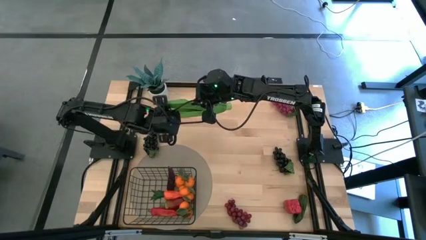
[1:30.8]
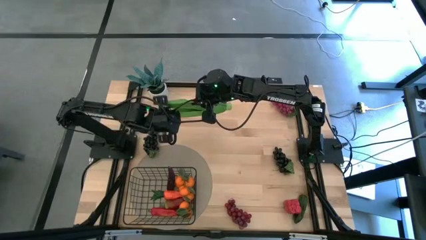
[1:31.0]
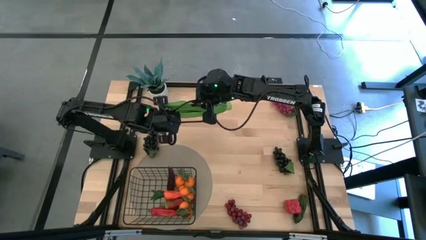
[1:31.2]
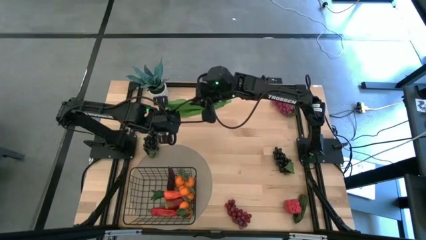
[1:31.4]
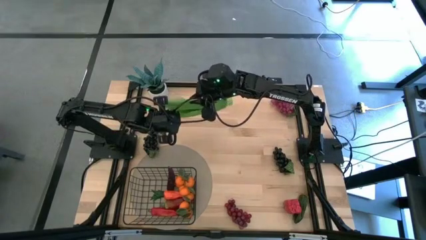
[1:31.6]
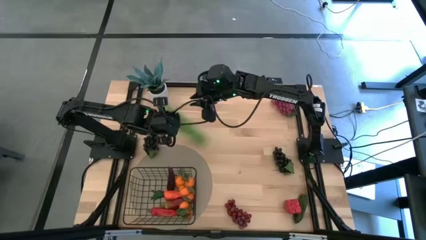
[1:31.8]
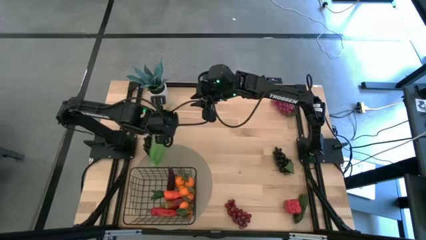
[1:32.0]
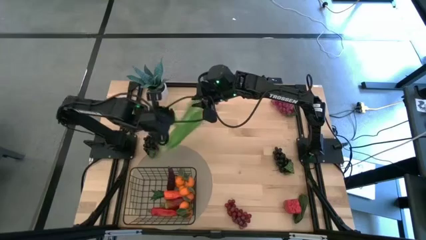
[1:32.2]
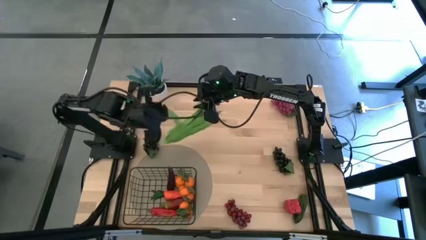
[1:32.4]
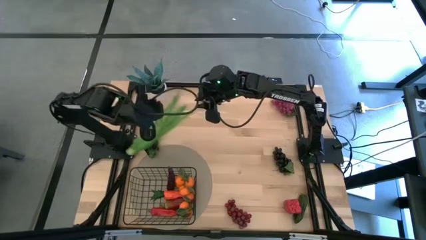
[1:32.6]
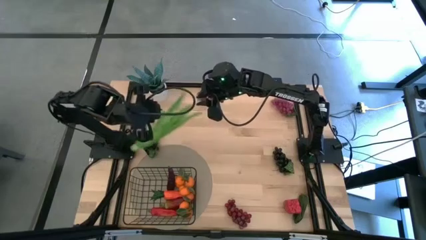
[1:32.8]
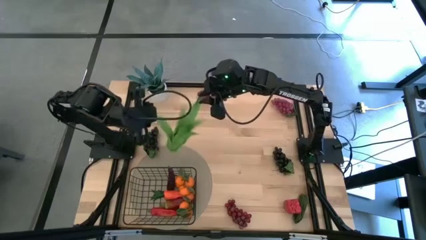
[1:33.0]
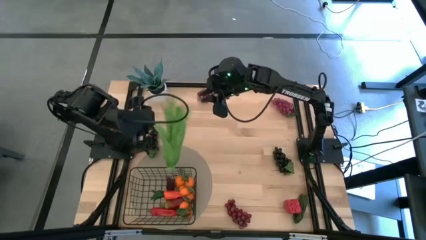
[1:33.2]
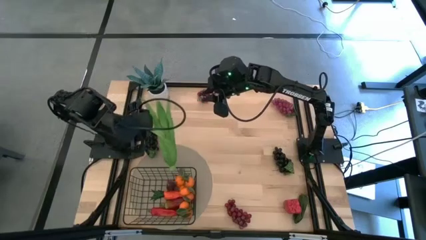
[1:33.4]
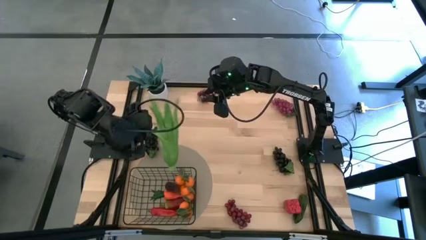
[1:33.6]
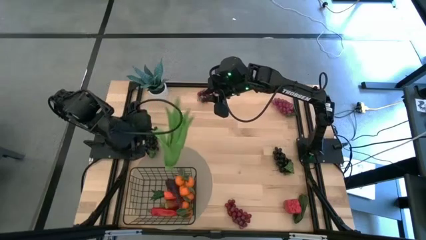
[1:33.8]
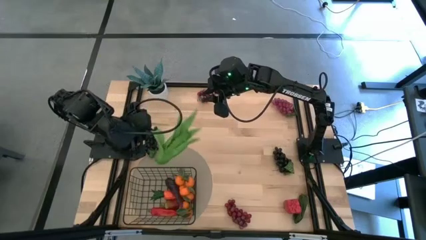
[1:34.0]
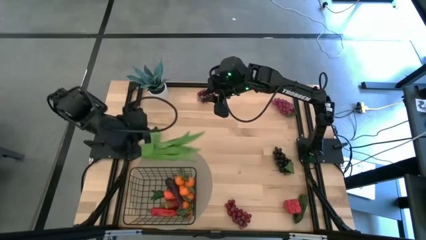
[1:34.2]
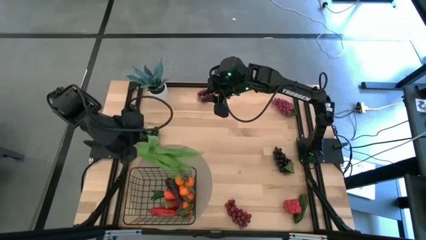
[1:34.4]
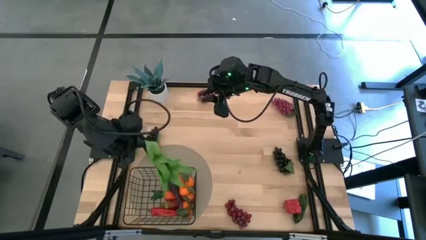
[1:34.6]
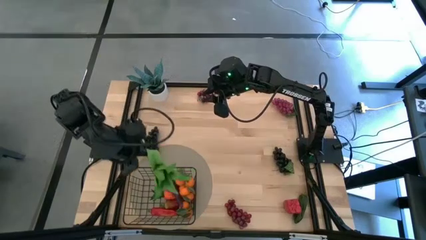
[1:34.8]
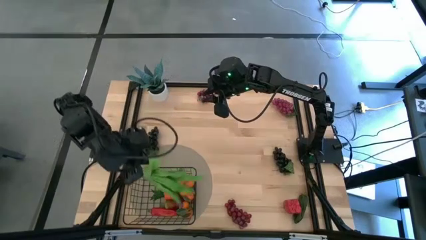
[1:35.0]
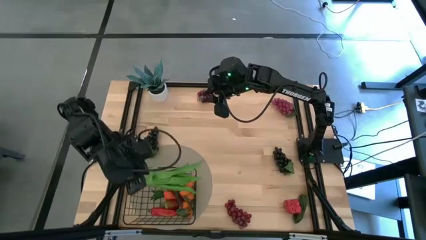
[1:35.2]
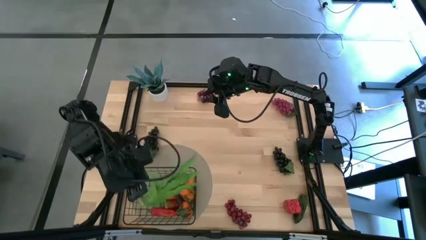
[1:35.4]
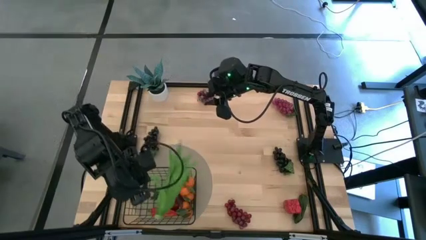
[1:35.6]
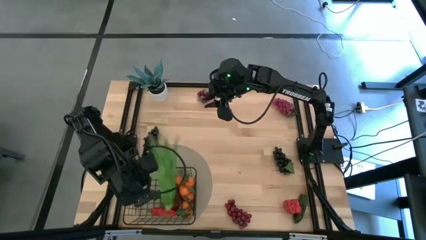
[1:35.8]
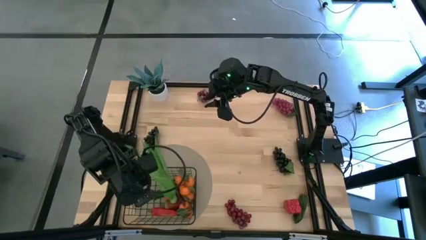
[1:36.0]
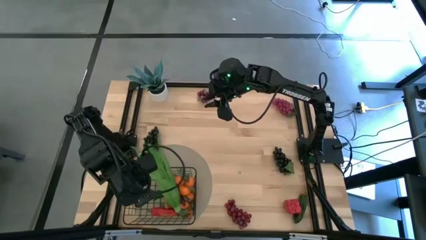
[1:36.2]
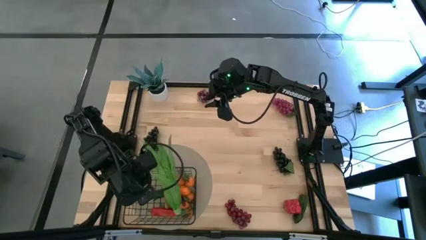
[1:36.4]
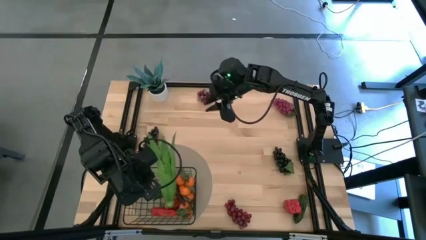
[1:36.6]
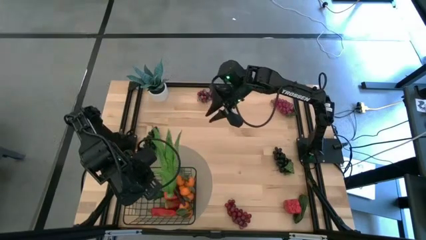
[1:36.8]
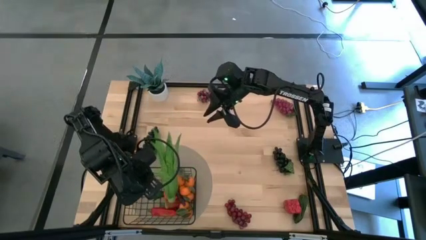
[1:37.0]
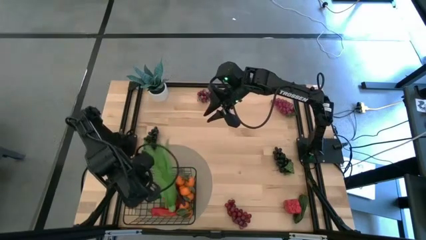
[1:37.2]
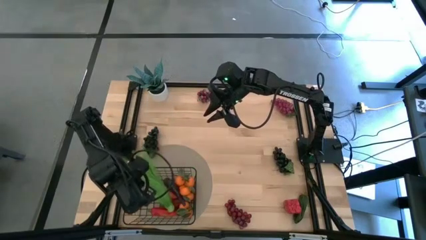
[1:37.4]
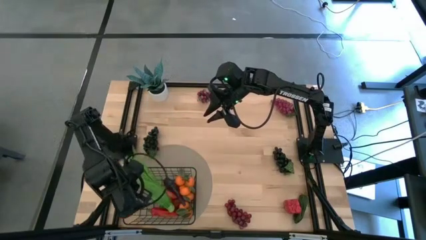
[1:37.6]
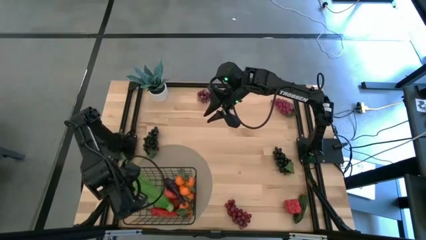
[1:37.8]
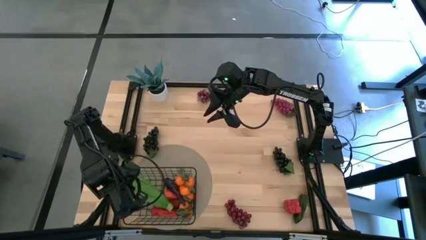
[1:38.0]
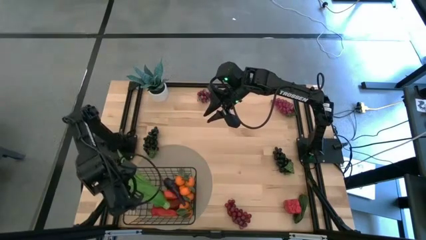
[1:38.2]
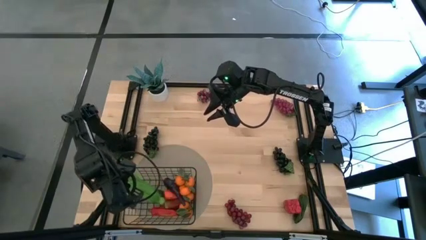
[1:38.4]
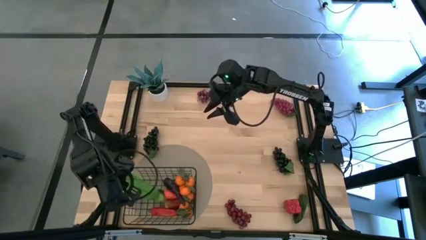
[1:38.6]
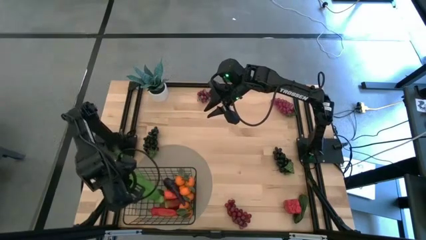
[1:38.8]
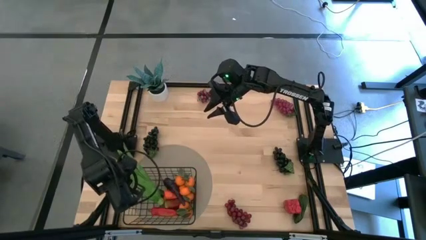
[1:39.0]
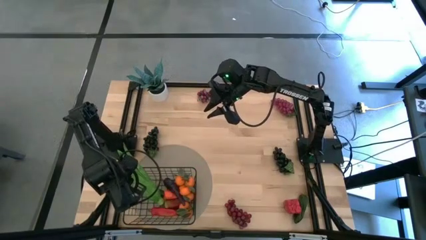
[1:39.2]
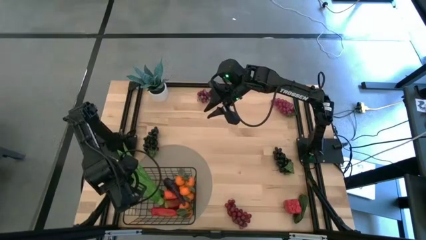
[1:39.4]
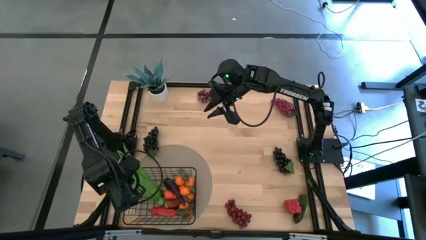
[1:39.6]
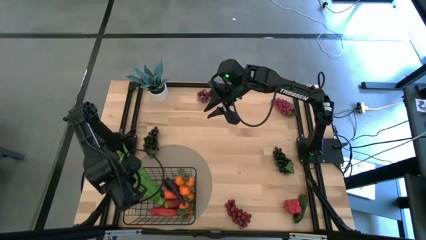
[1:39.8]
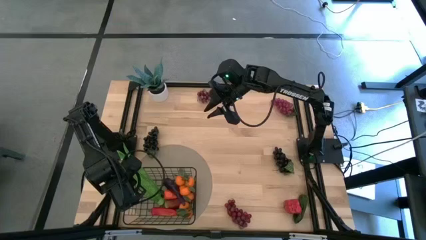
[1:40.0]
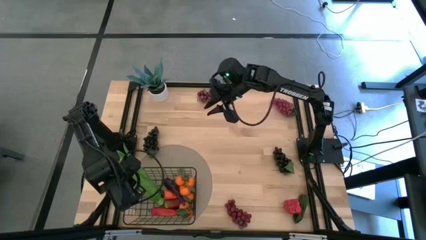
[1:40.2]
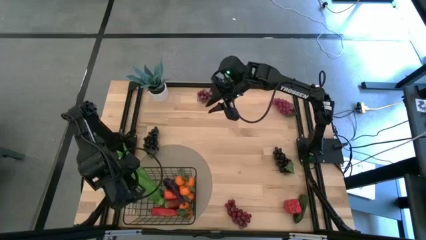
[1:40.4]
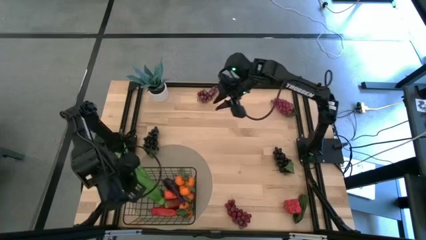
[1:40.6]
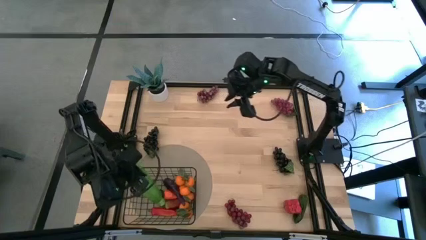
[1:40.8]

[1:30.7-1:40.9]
Task: Build produce basket
Put the lettuce into the wire basket

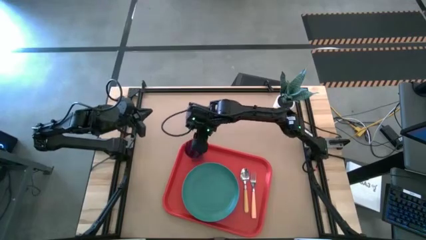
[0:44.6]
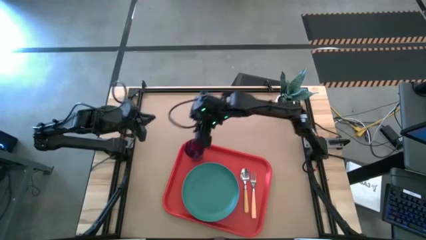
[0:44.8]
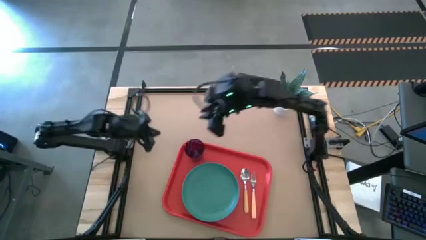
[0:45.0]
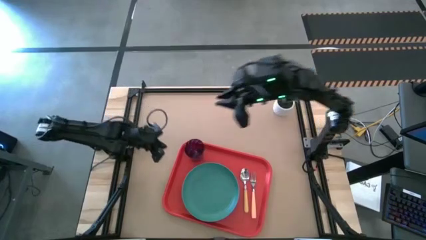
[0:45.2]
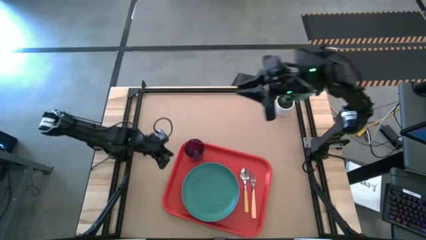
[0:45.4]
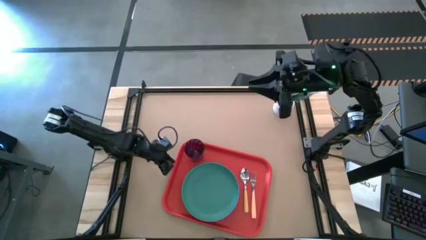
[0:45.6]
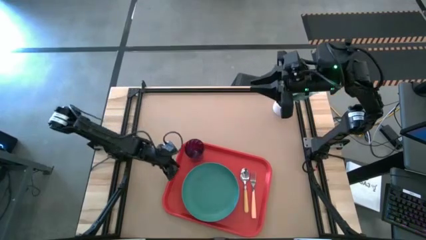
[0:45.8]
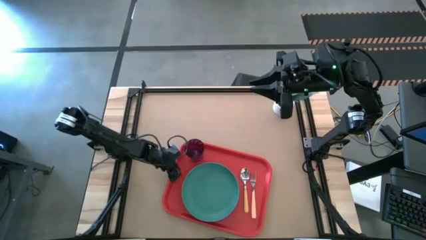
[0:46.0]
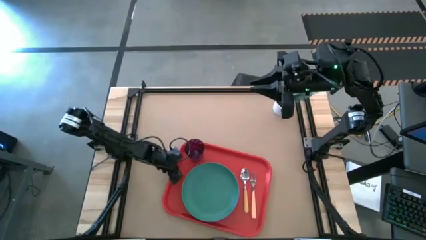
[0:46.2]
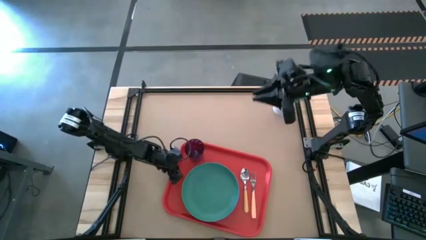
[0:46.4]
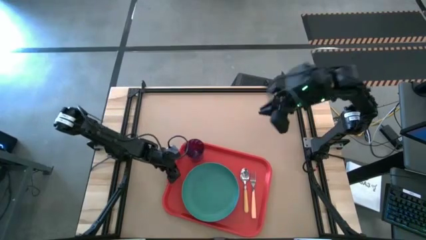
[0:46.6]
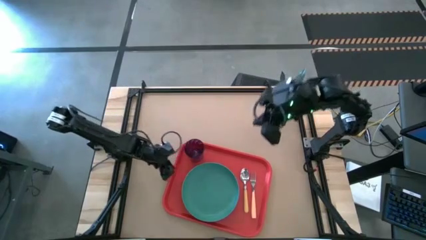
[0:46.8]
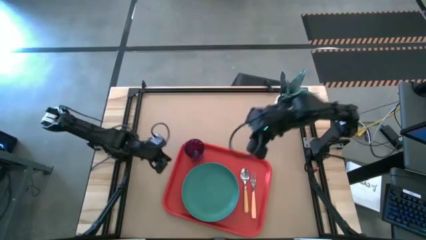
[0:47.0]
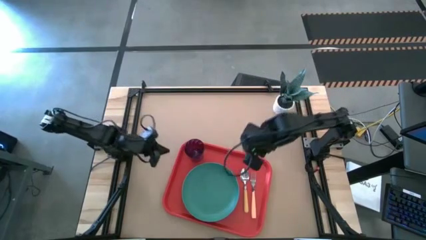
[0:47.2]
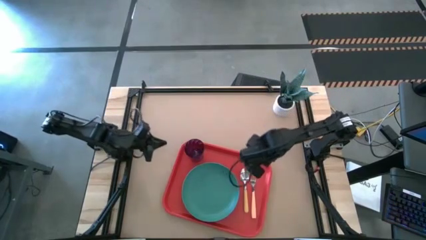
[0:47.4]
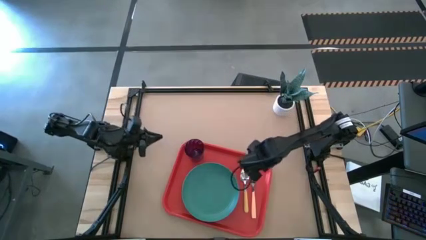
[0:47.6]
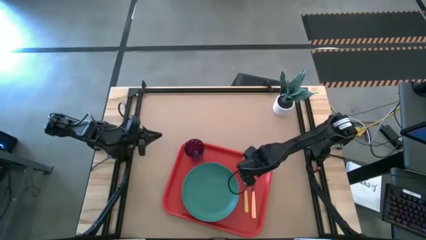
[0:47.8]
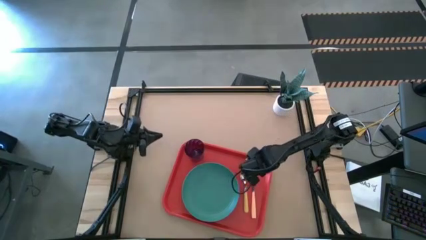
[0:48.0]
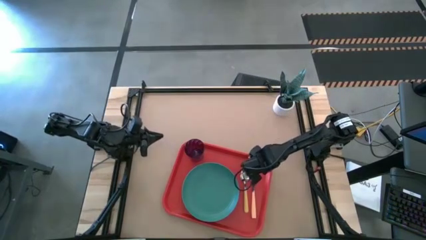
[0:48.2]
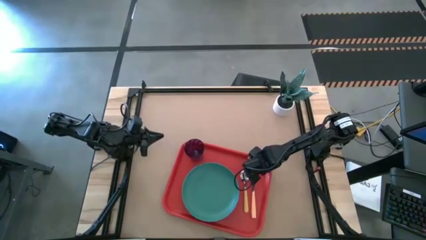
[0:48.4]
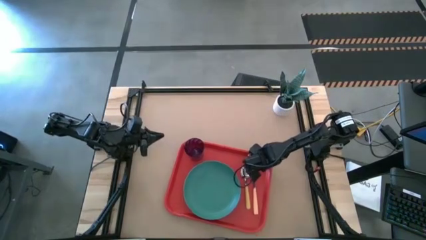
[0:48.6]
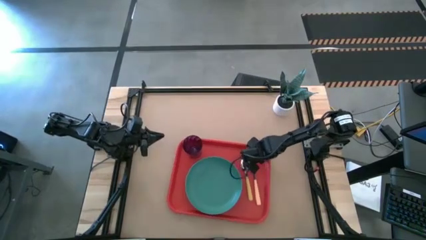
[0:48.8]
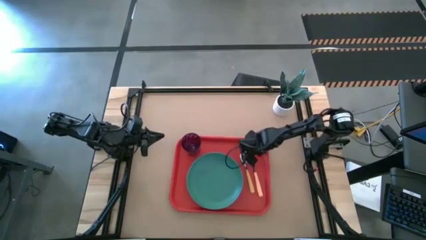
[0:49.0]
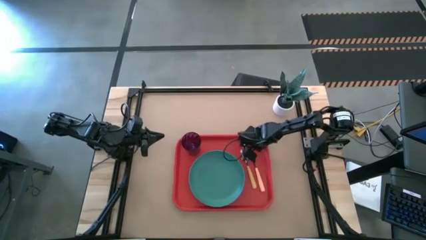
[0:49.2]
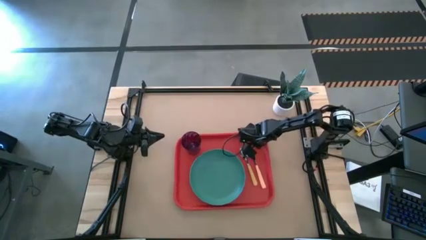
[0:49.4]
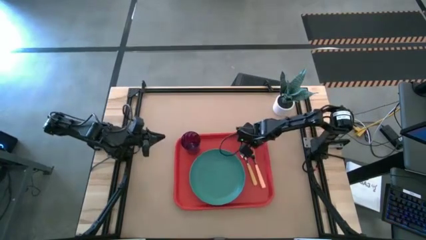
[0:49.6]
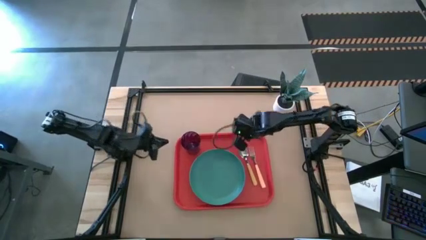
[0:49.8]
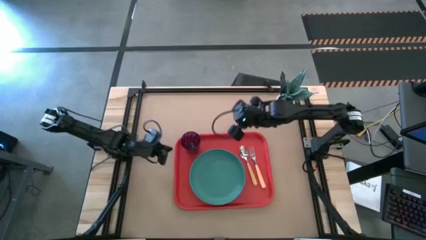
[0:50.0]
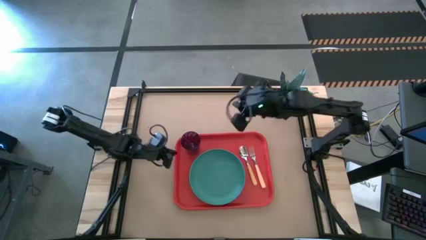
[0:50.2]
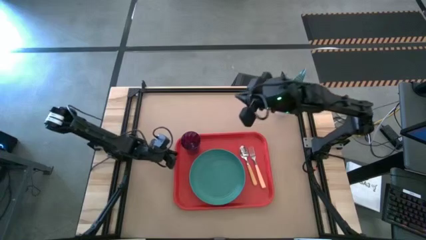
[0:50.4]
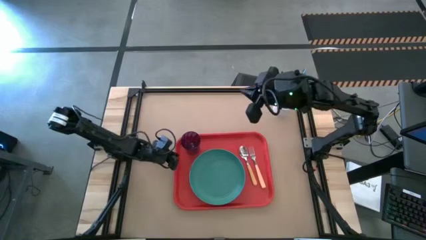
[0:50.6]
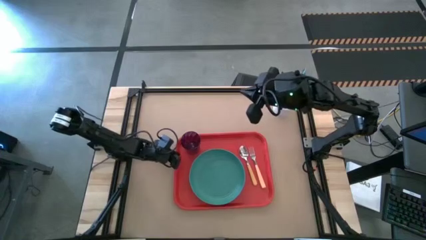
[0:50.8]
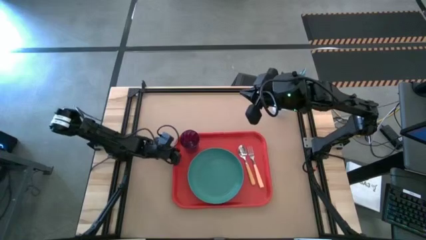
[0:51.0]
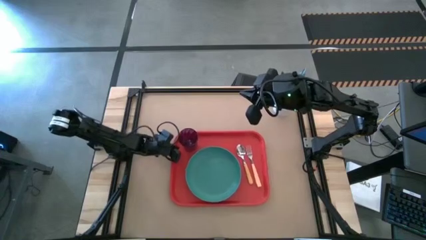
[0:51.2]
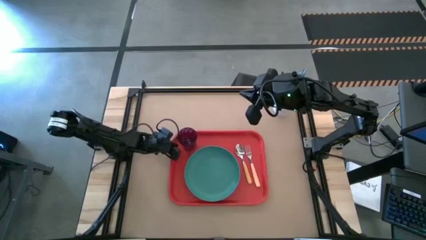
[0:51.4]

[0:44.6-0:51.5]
Task: Pick and place plate/cup/fork/spoon on tray
Adjust the red serving tray
